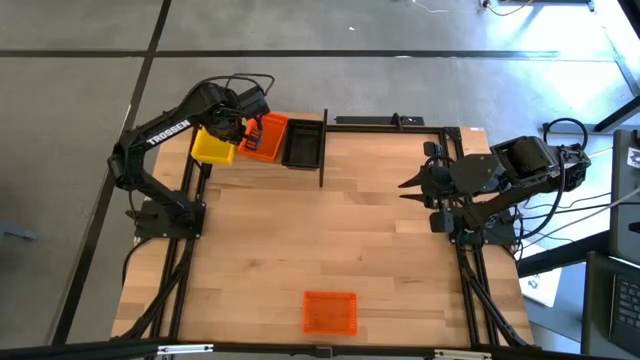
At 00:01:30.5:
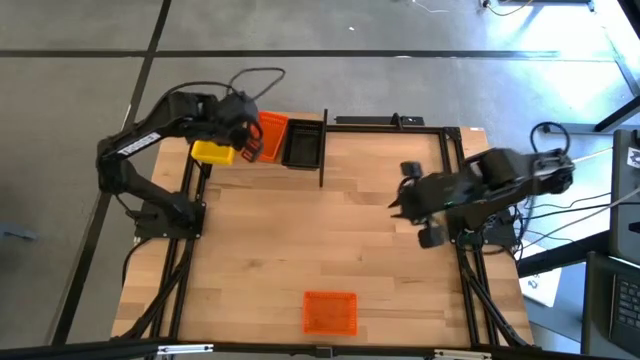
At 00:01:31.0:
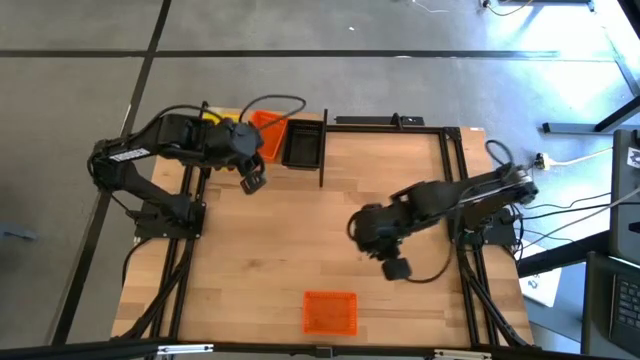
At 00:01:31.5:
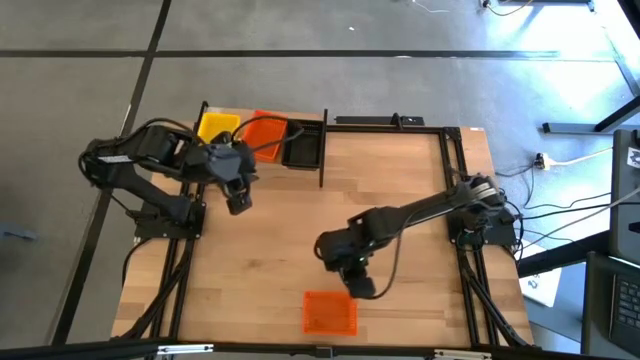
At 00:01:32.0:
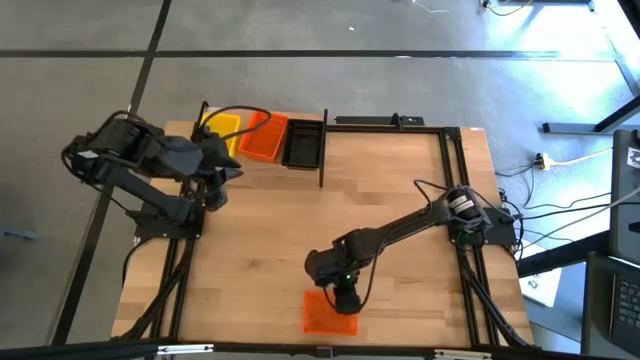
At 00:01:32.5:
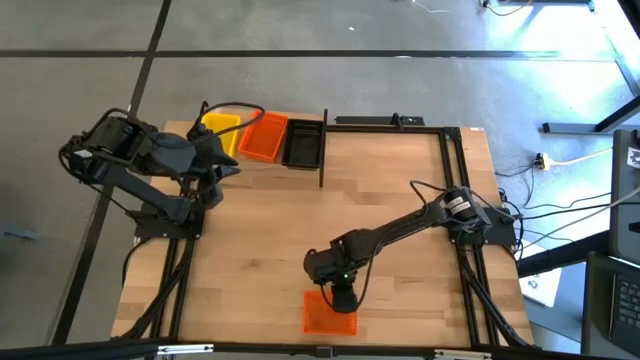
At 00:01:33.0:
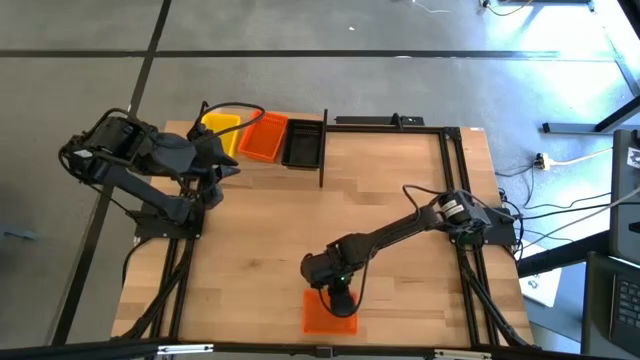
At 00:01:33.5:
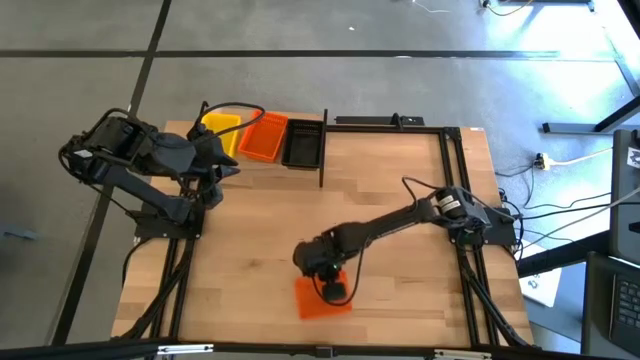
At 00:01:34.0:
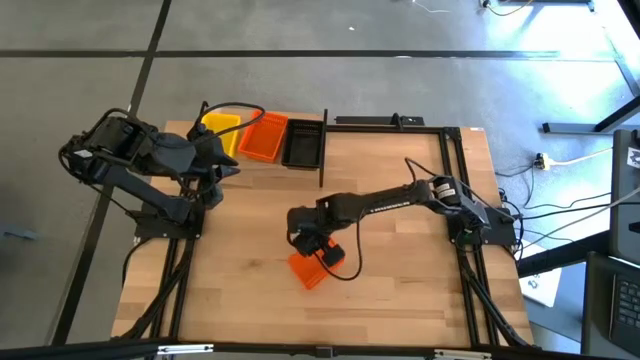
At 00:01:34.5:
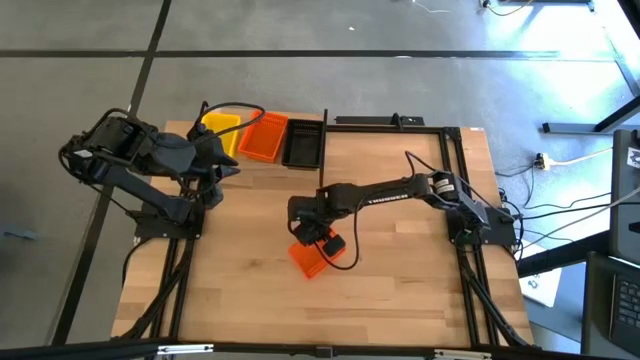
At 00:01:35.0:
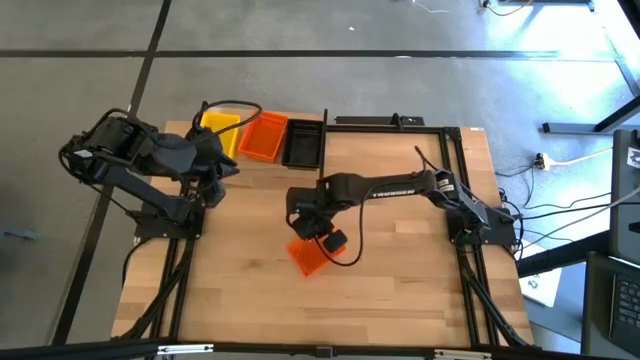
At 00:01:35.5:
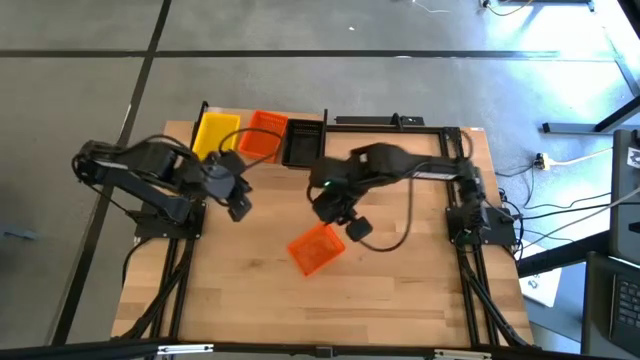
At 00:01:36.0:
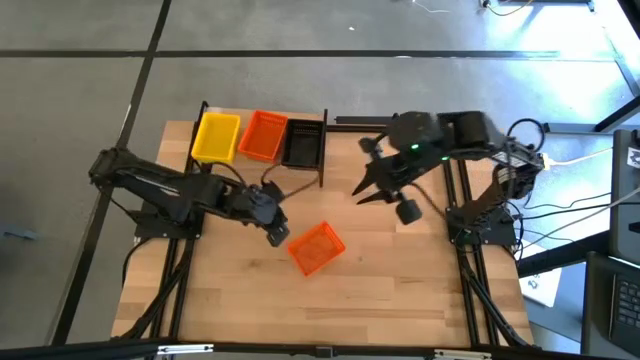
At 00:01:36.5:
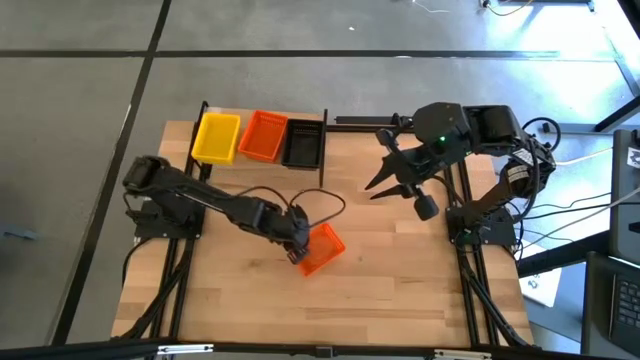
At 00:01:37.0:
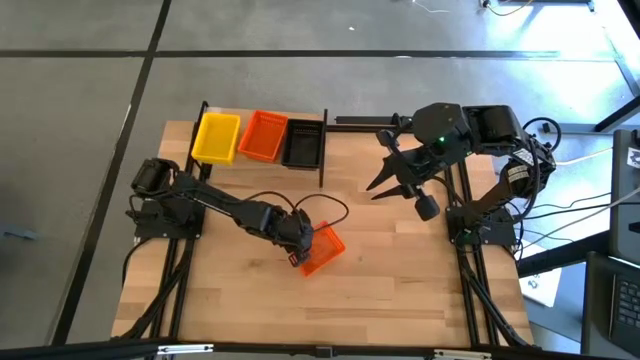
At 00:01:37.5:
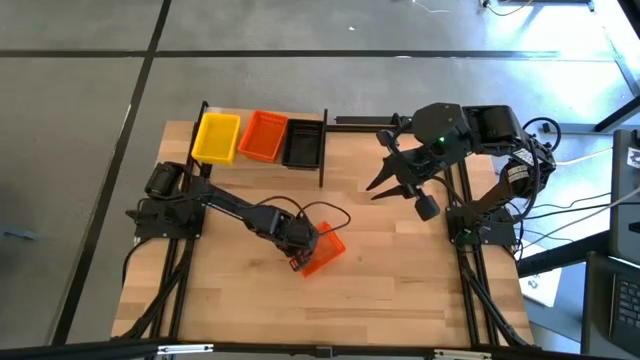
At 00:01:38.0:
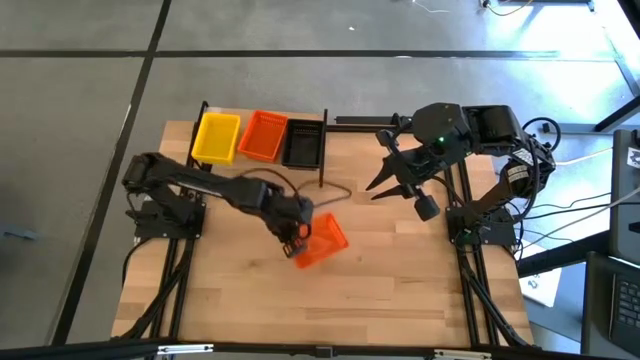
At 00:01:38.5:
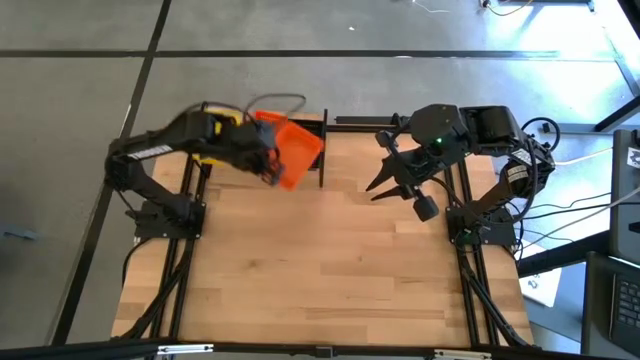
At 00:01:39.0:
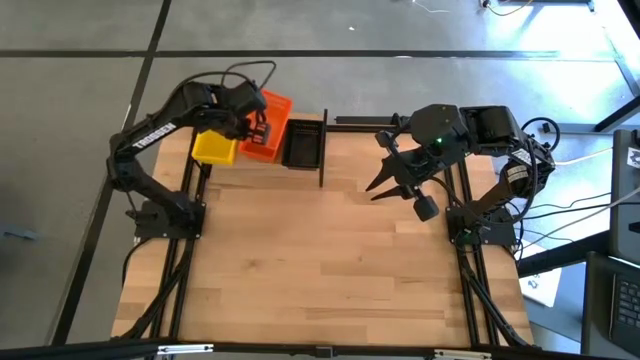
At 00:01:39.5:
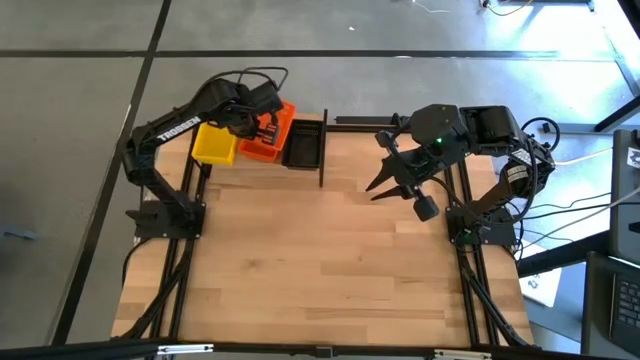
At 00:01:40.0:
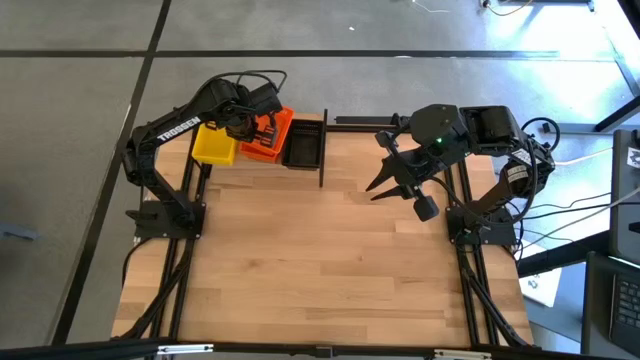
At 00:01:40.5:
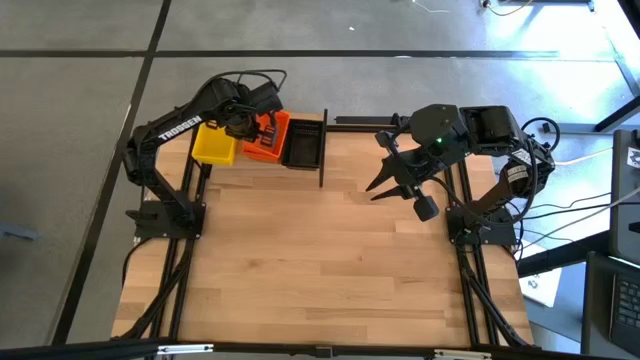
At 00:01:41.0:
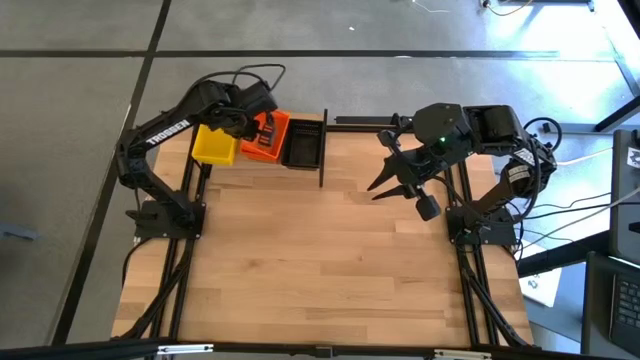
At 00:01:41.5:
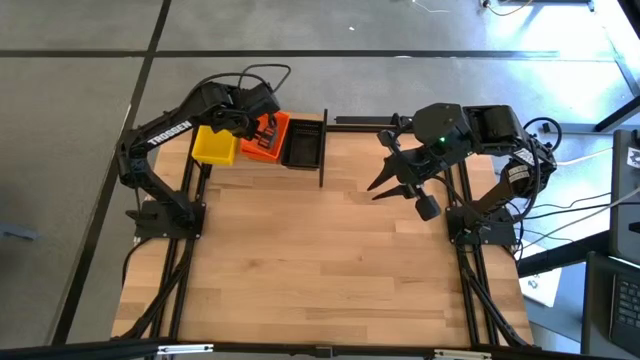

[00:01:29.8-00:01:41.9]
Task: Stack baskets on shelf by color
Stack the orange basket on top of the orange basket on the shelf

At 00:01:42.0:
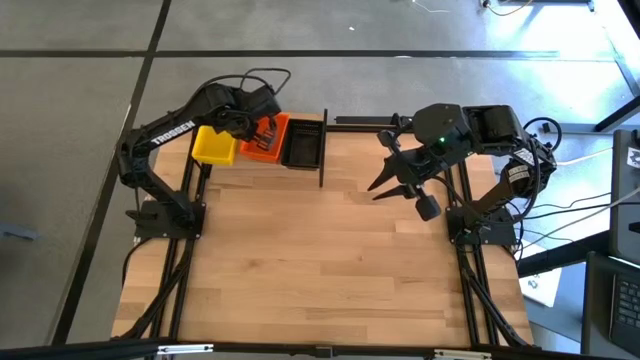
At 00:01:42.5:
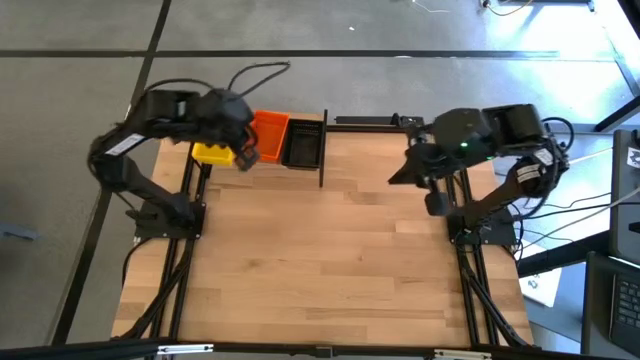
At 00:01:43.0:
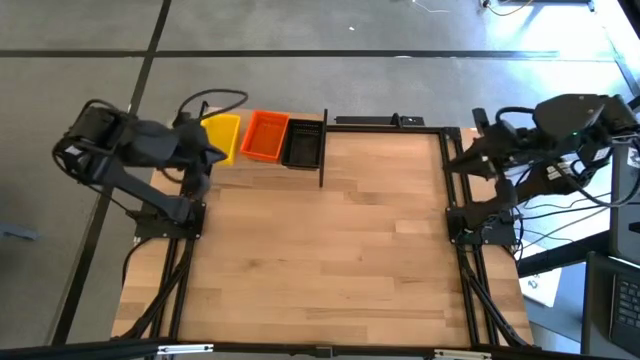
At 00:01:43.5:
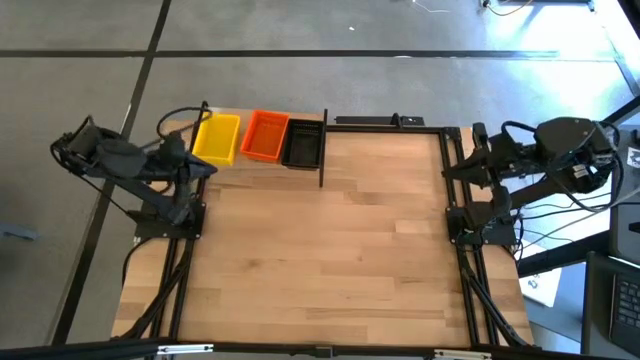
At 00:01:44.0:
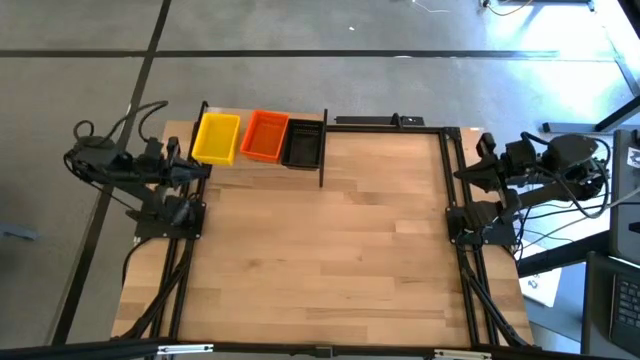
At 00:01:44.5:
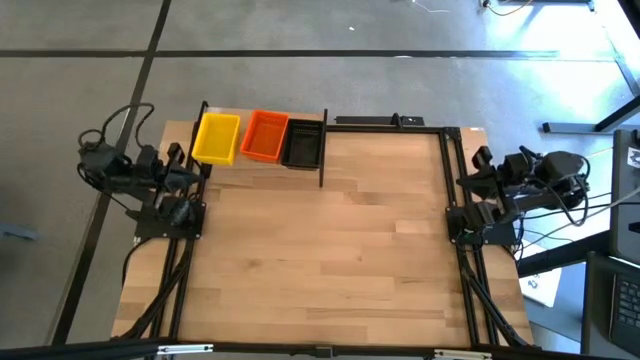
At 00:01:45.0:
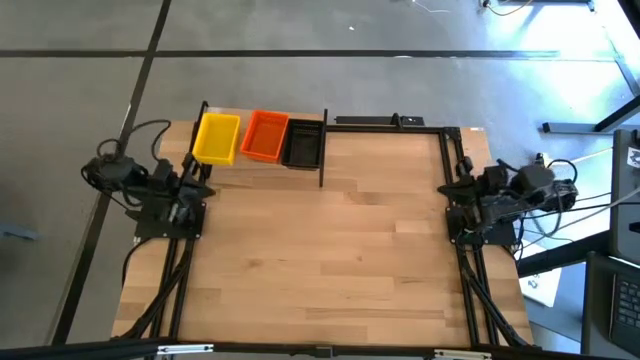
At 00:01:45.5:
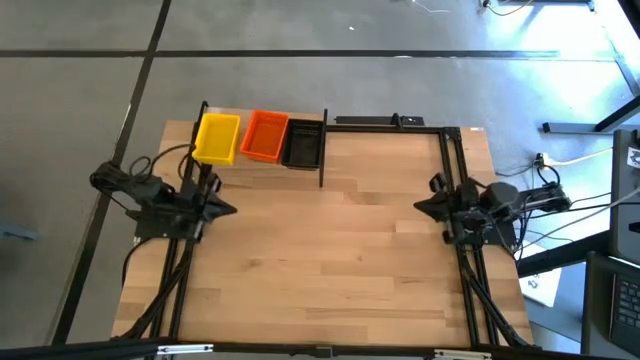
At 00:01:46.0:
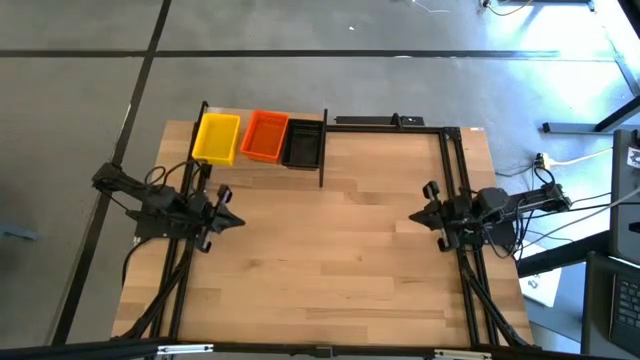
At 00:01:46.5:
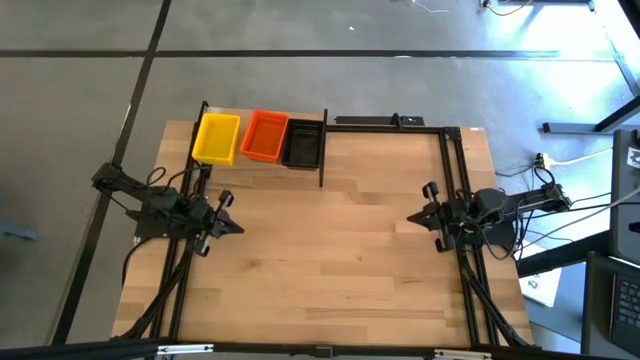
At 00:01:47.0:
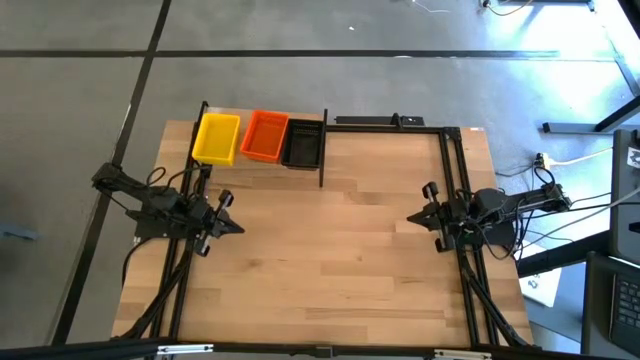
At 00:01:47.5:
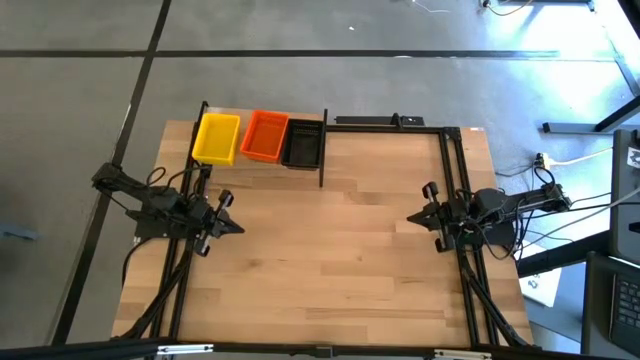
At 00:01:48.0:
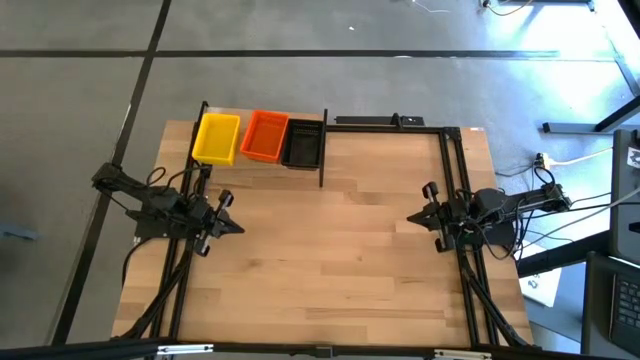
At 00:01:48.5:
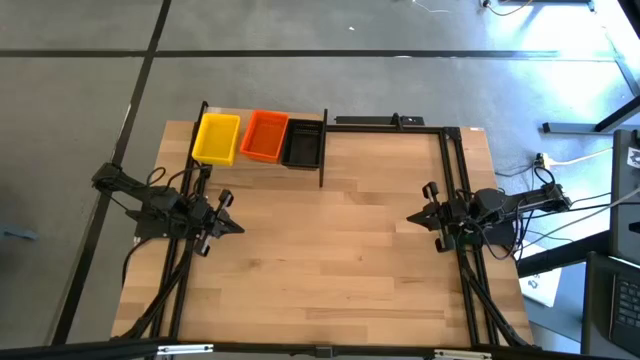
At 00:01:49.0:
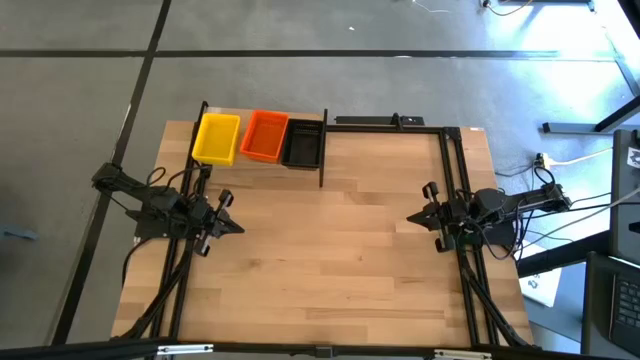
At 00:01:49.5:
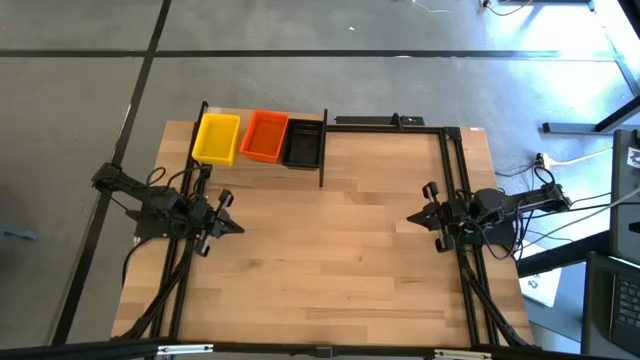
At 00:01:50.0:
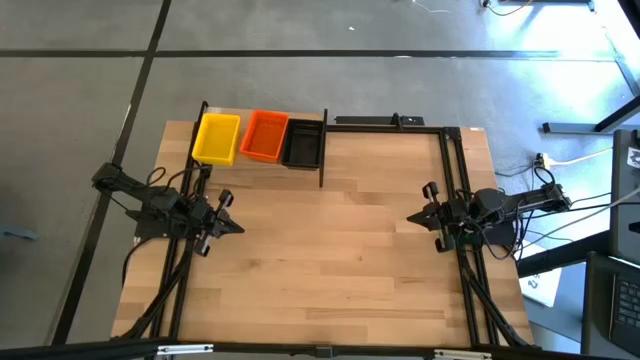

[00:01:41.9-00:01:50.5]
Return to Home Position
